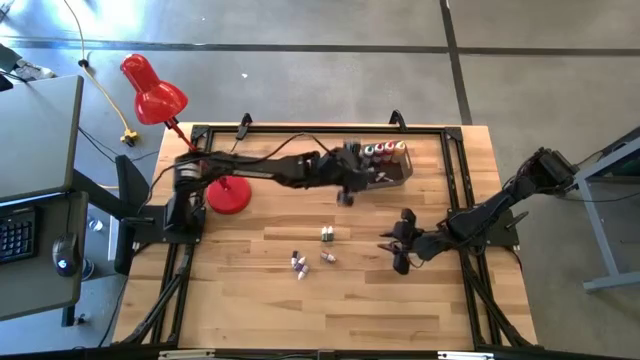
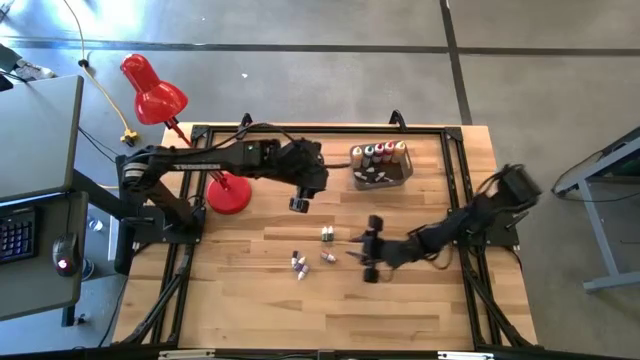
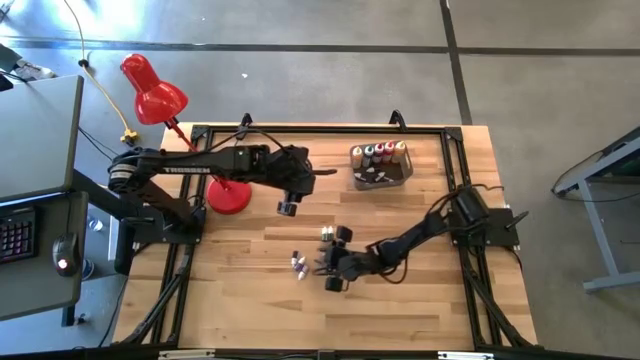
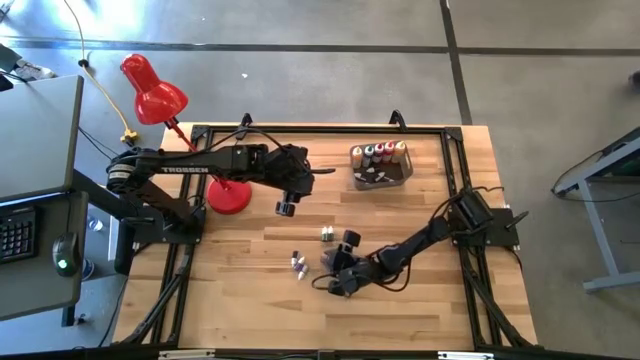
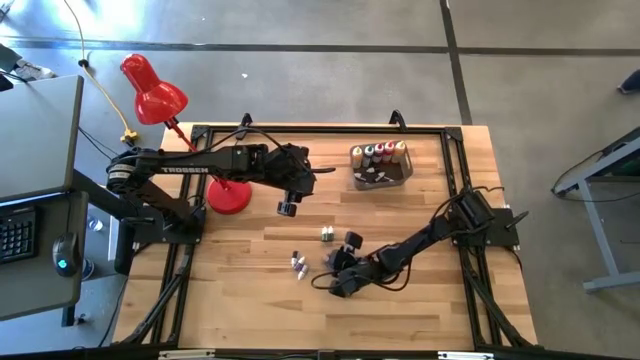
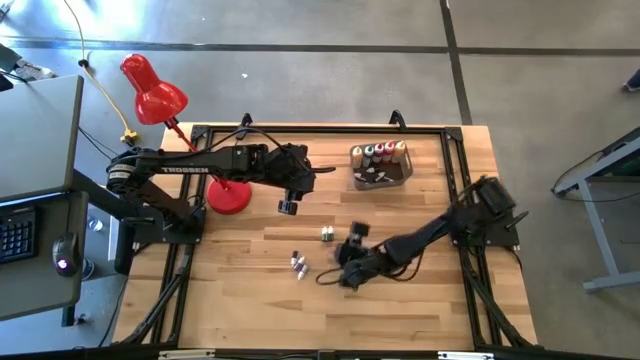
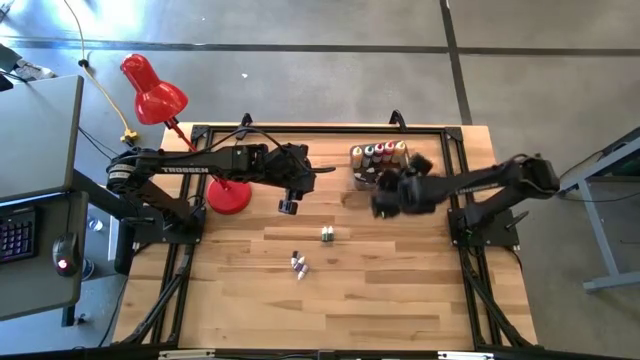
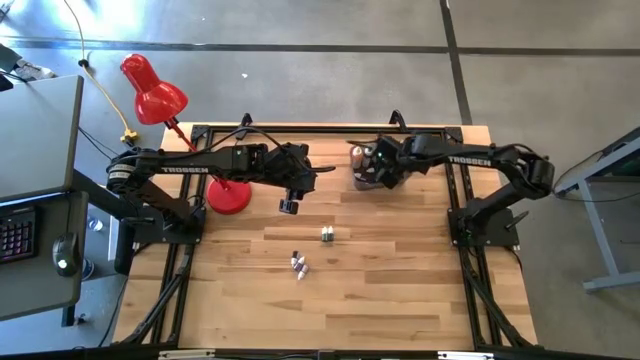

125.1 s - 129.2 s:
Task: Pick & Place food coloring
Put the small red food coloring bottle into the bin

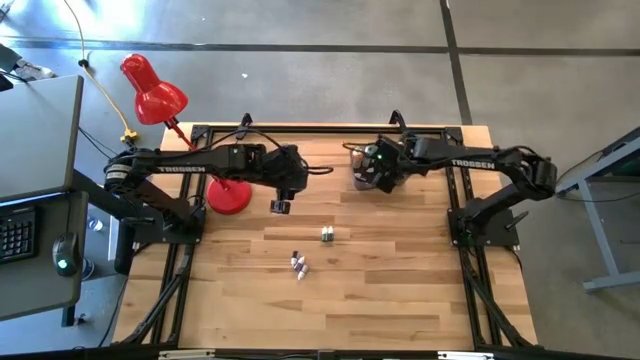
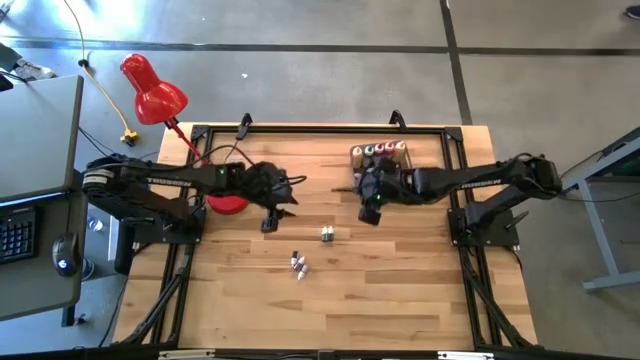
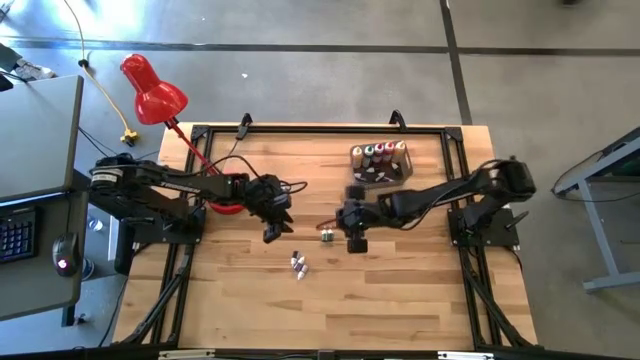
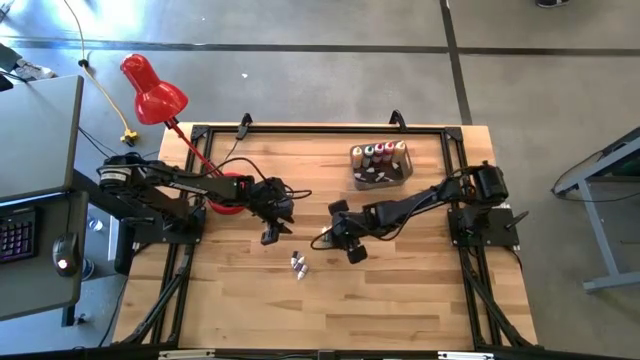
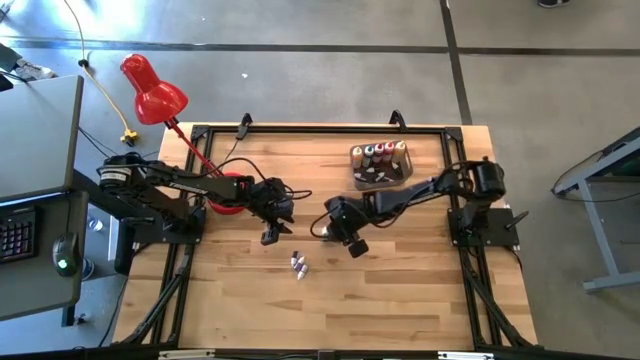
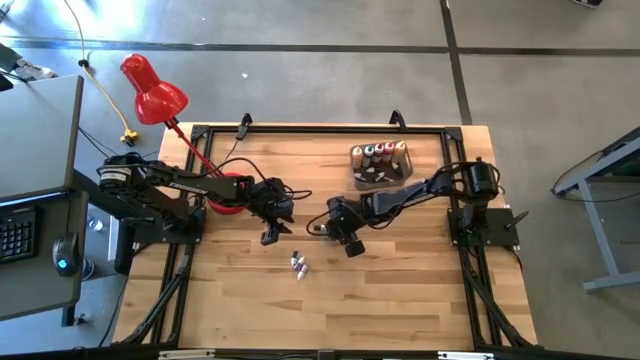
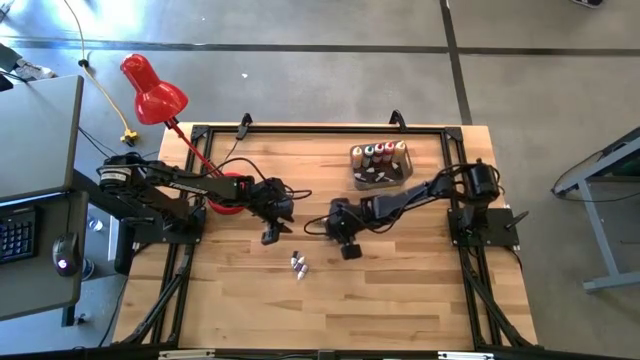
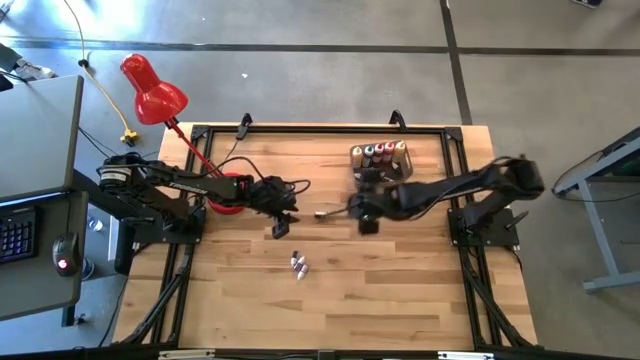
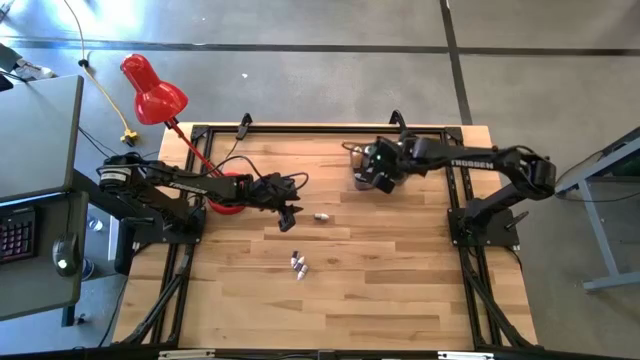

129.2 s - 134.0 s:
Put the right small green food coloring bottle into the bin

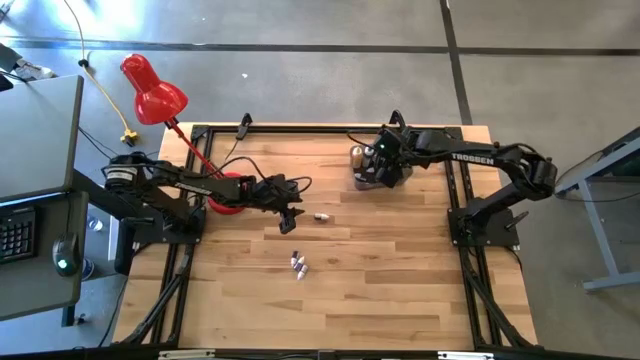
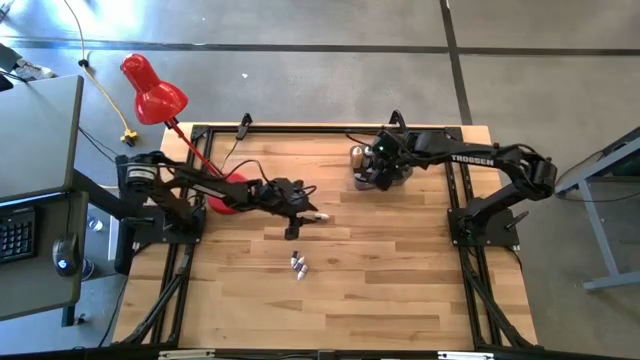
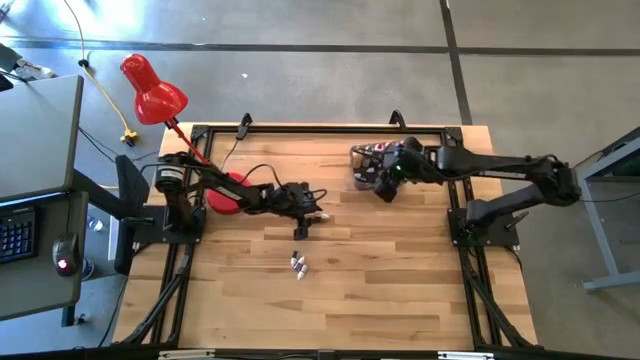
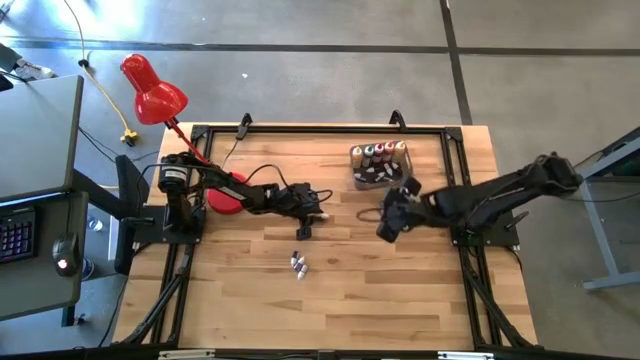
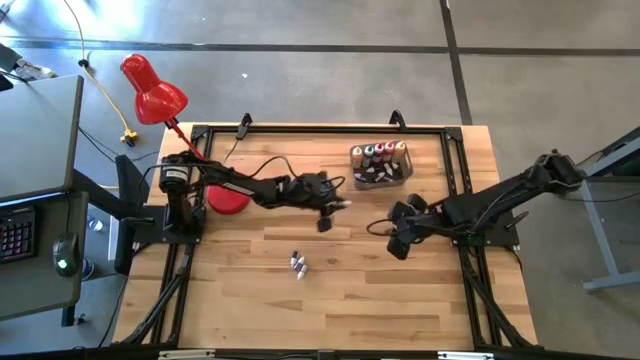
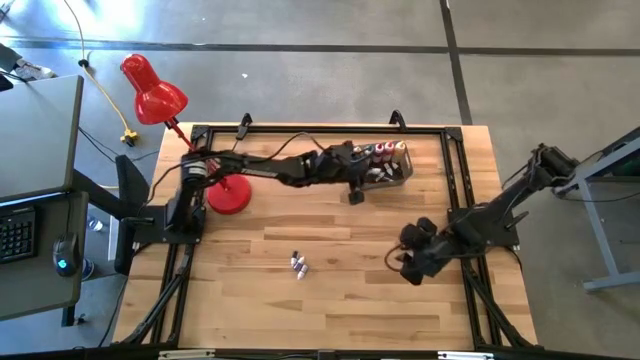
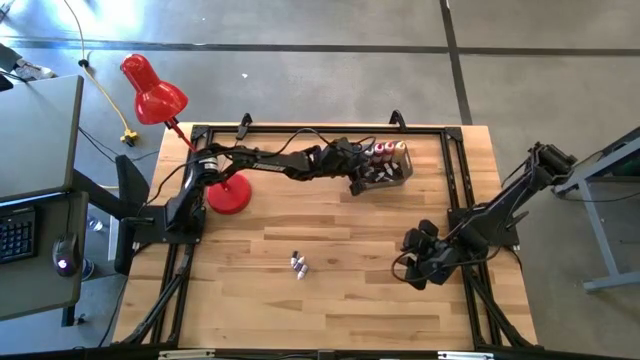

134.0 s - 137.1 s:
Put the small green food coloring bottle into the bin

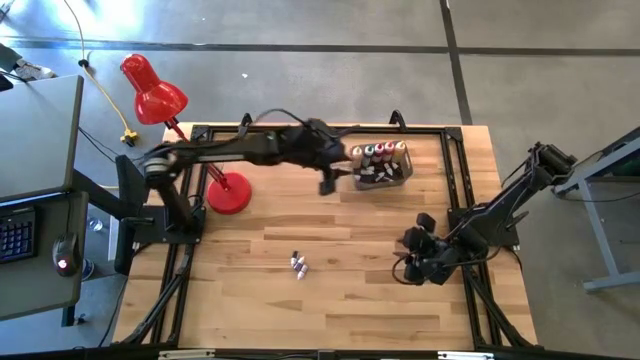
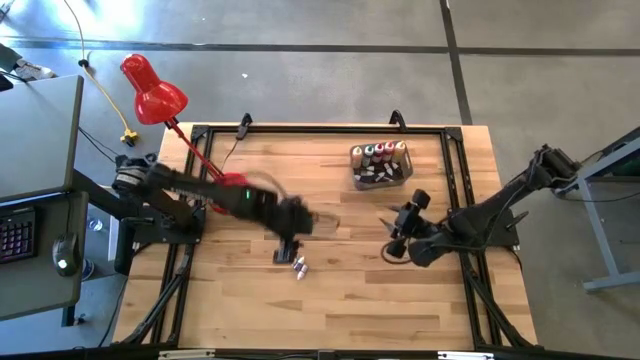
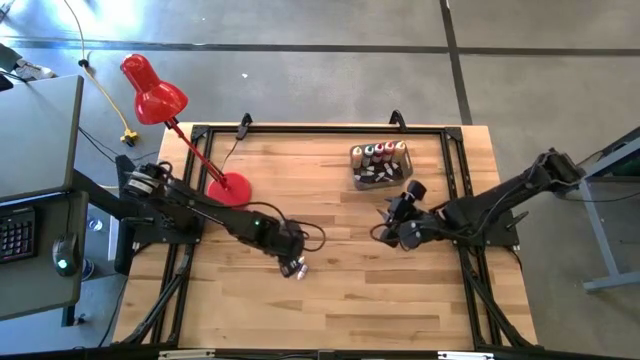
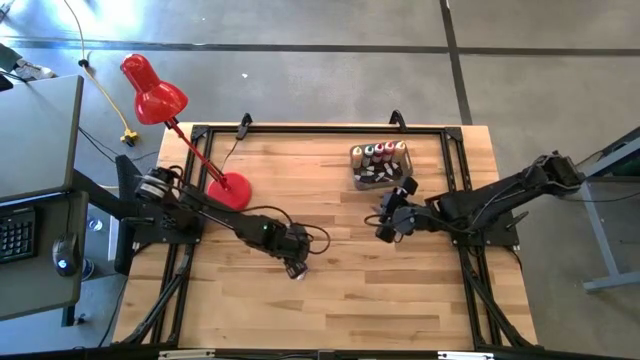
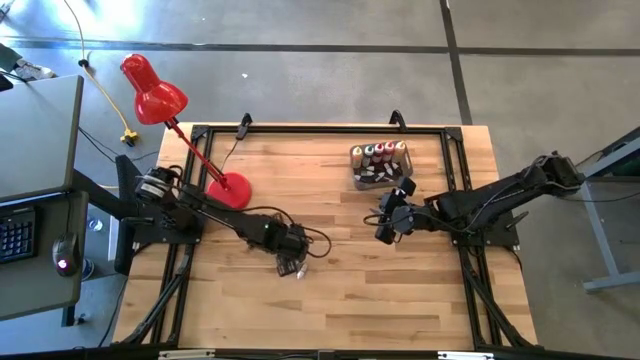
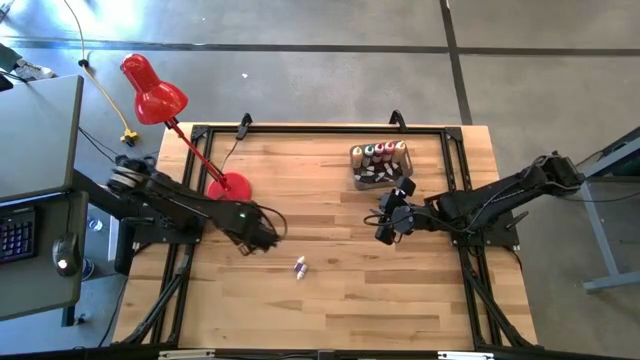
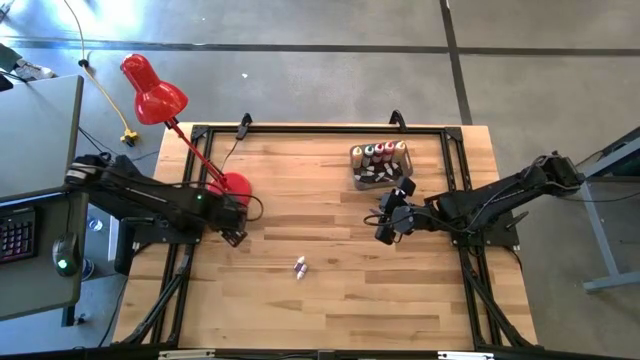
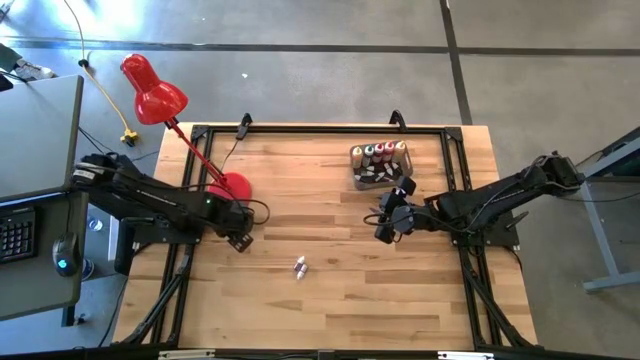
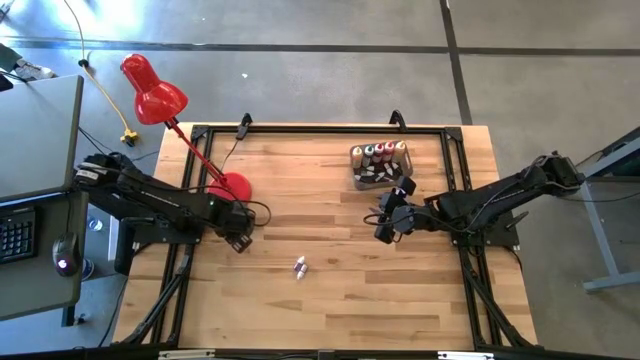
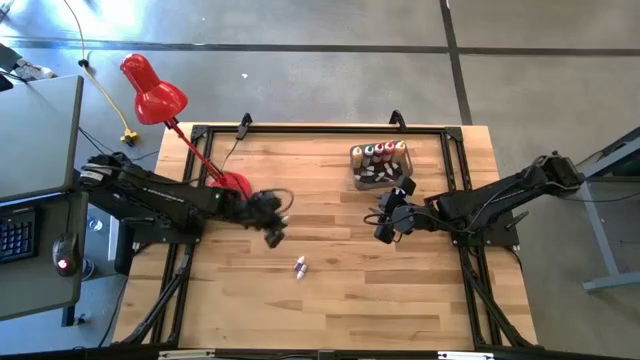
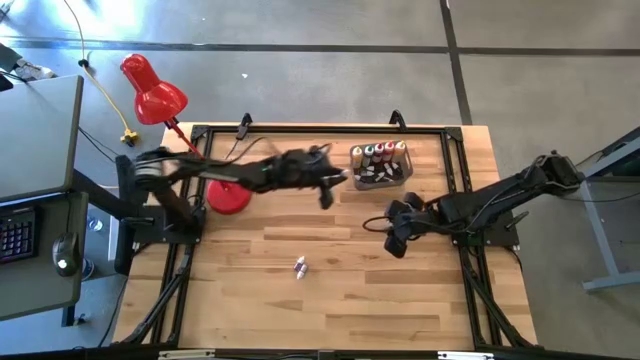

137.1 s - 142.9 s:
Put the small blue food coloring bottle into the bin

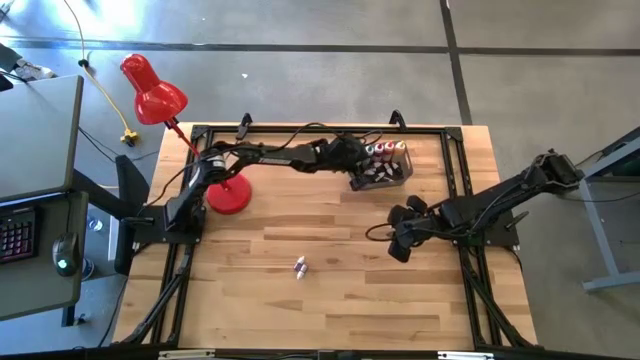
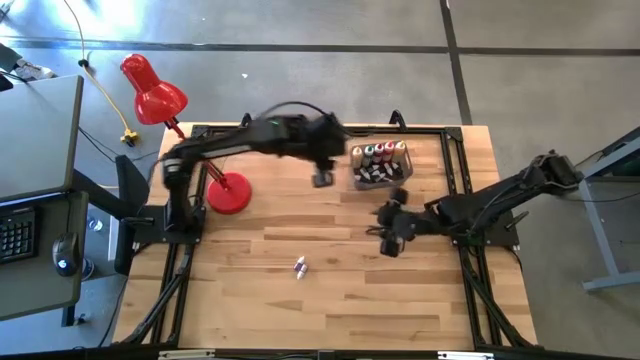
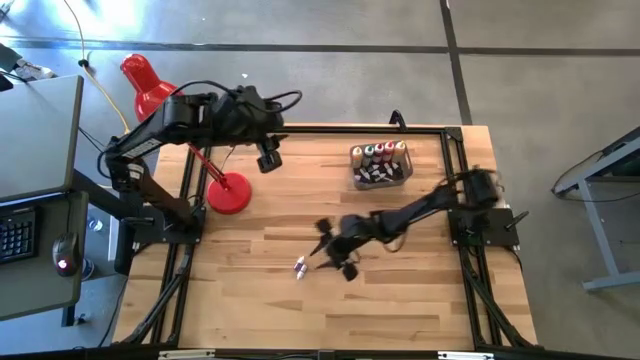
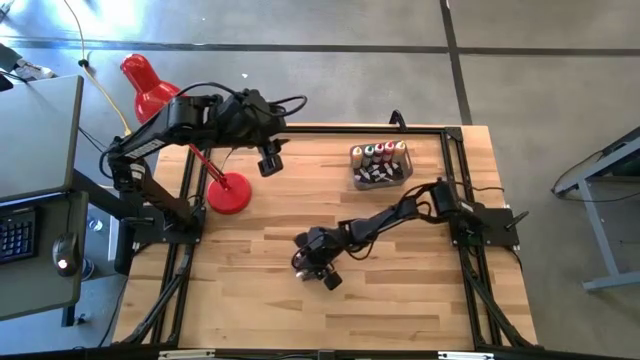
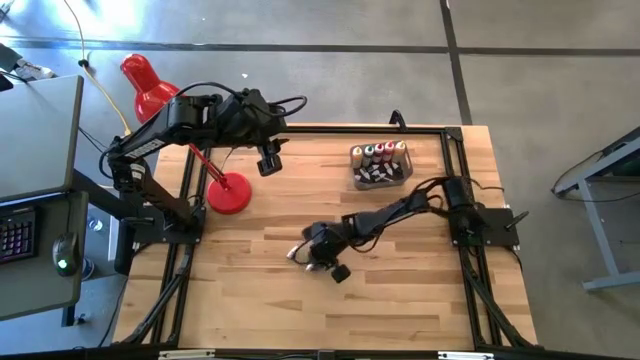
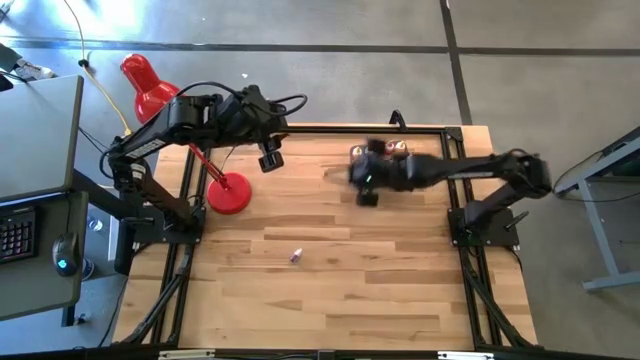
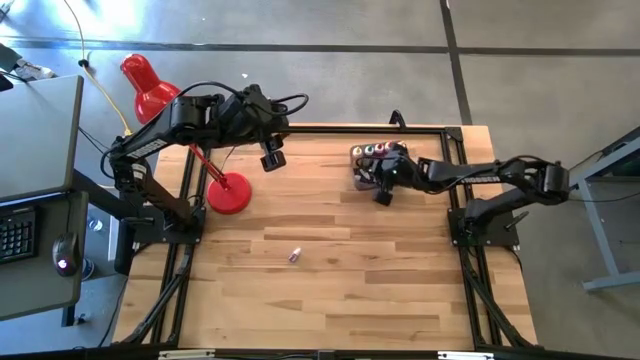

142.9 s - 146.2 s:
Put the small pink food coloring bottle into the bin

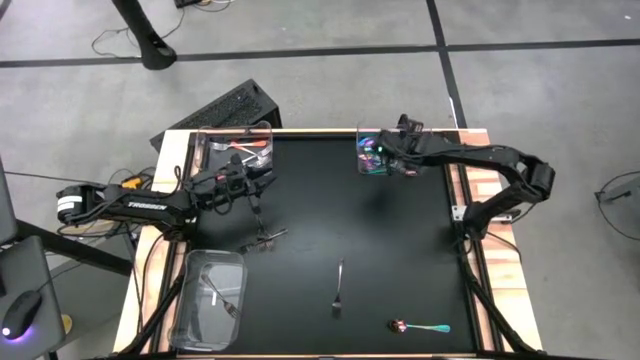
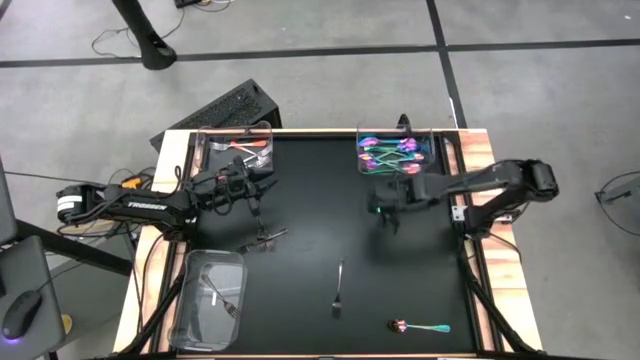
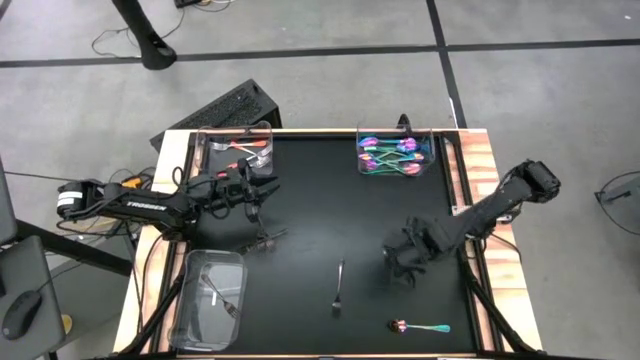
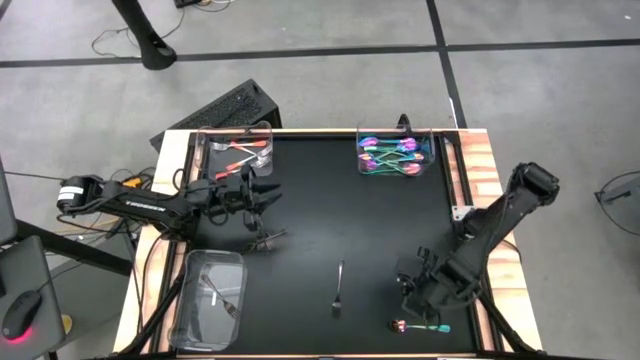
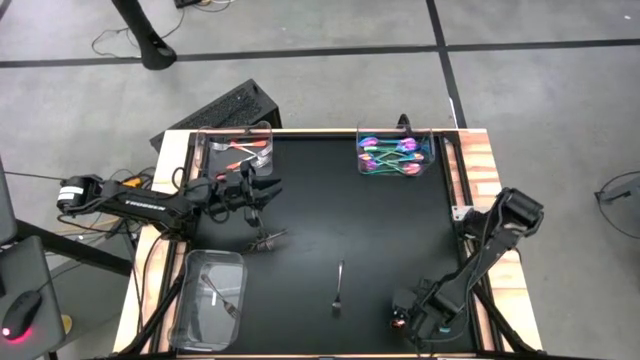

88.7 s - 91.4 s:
Task: Sort silverware by color (type)
Put the blue spoon into top right transparent bin
